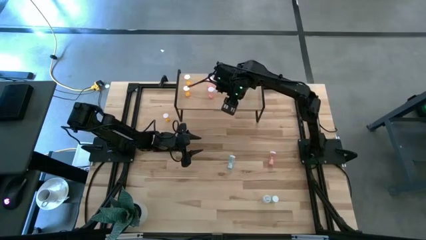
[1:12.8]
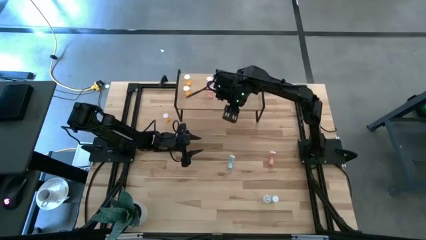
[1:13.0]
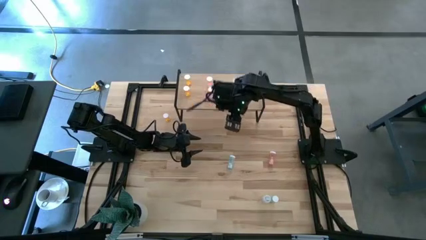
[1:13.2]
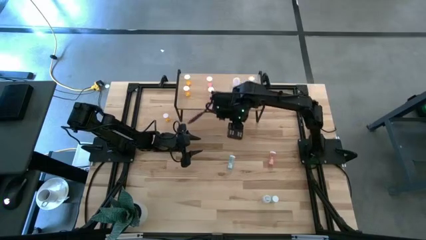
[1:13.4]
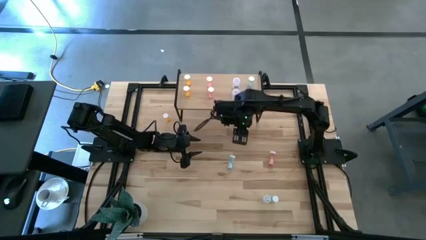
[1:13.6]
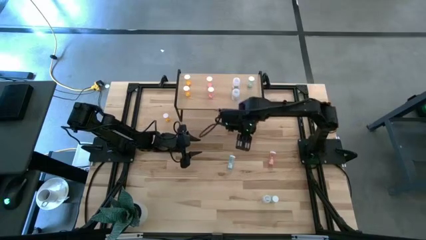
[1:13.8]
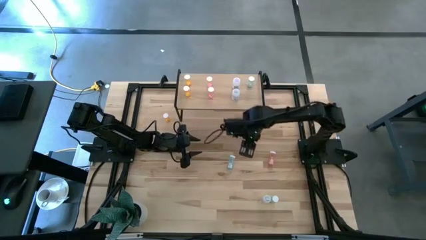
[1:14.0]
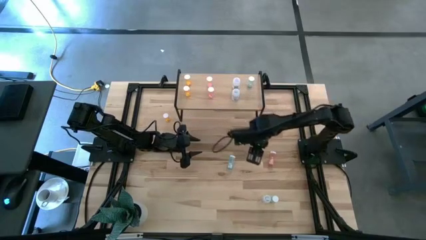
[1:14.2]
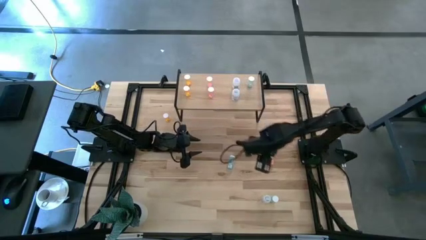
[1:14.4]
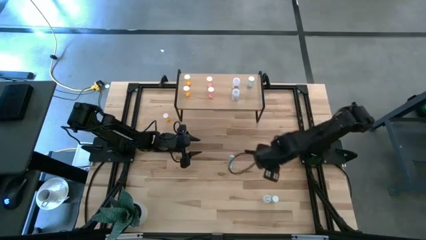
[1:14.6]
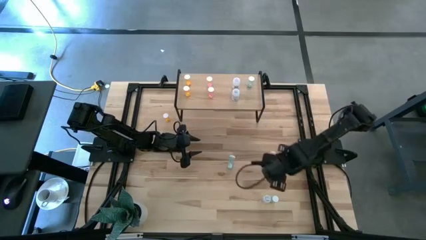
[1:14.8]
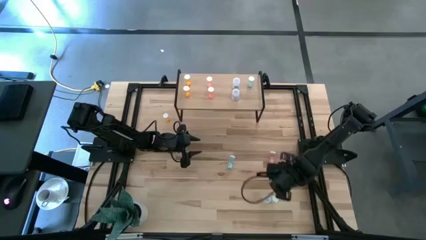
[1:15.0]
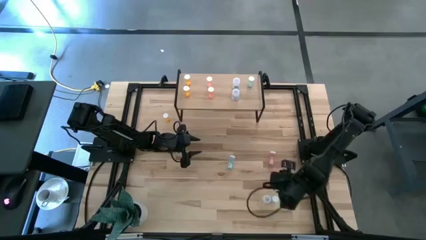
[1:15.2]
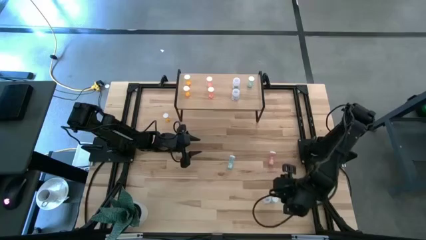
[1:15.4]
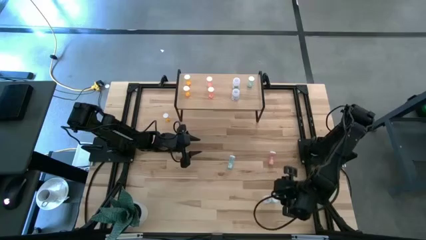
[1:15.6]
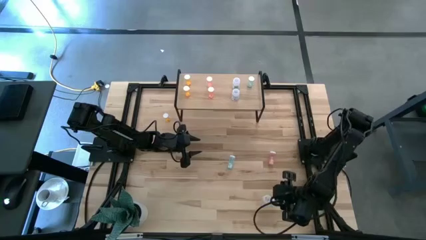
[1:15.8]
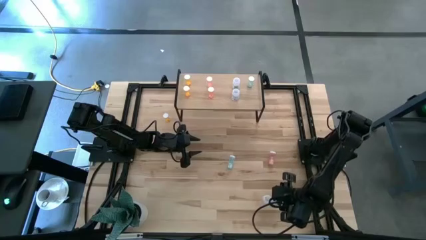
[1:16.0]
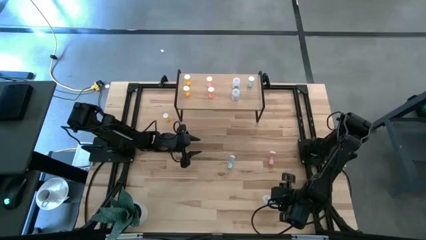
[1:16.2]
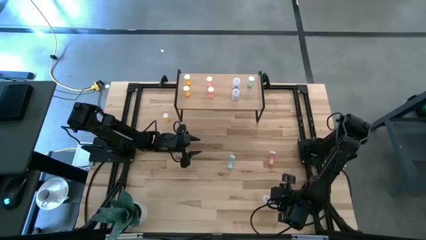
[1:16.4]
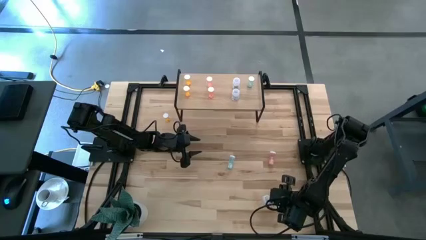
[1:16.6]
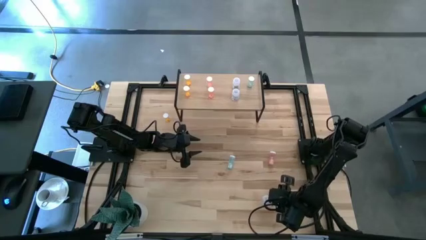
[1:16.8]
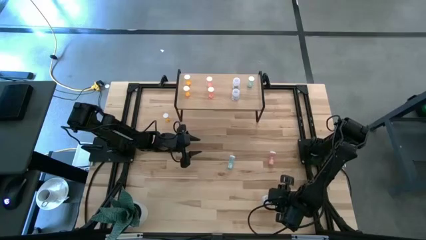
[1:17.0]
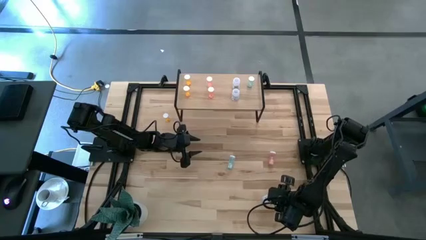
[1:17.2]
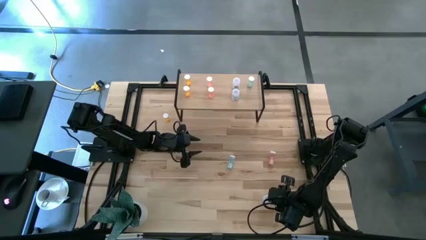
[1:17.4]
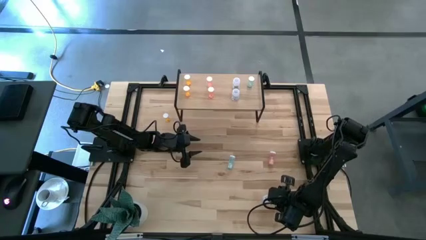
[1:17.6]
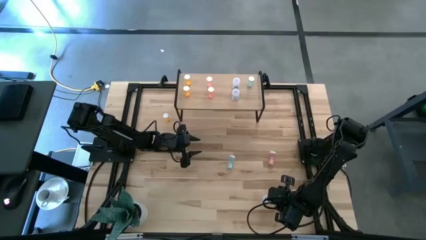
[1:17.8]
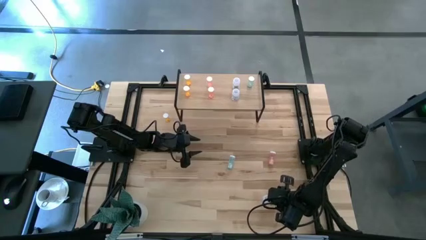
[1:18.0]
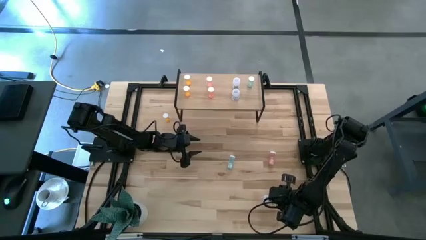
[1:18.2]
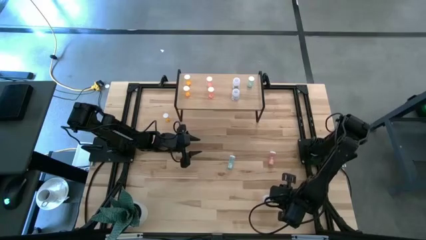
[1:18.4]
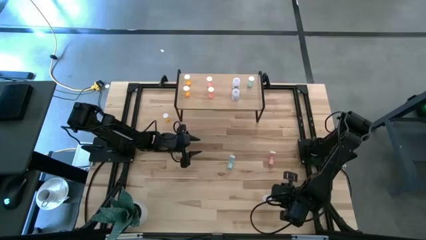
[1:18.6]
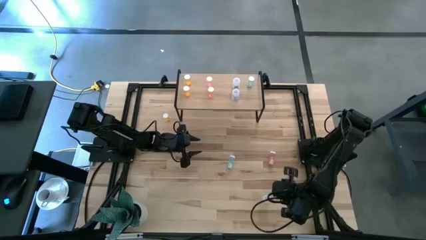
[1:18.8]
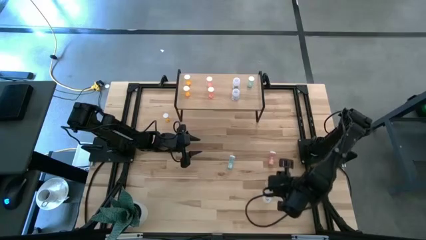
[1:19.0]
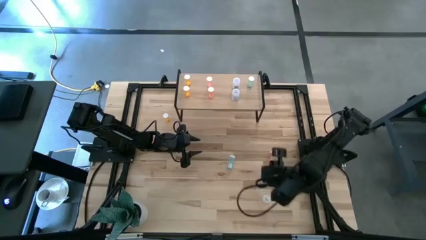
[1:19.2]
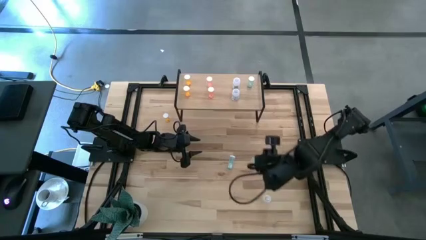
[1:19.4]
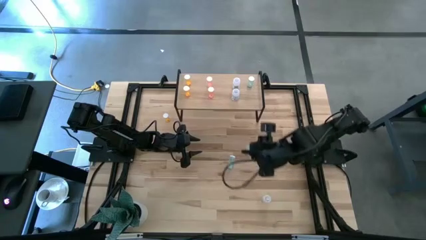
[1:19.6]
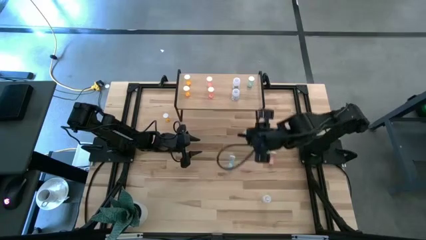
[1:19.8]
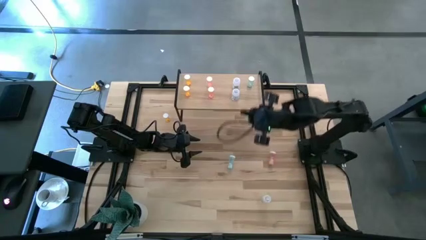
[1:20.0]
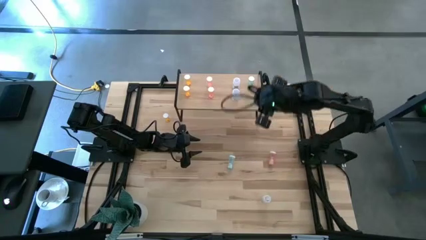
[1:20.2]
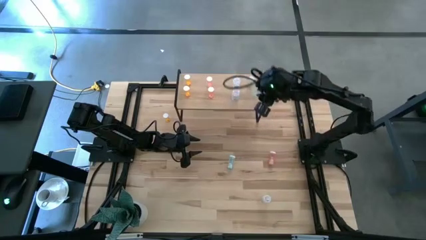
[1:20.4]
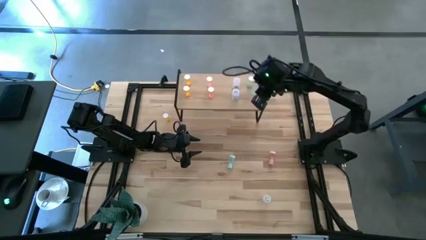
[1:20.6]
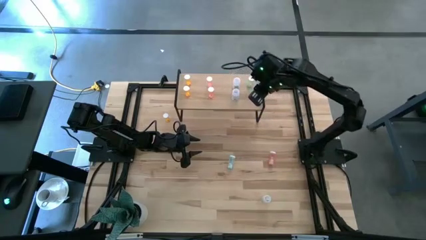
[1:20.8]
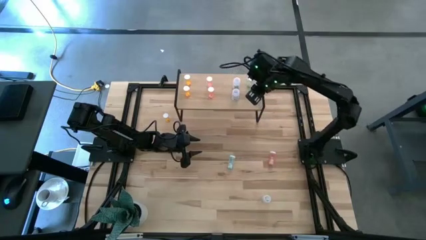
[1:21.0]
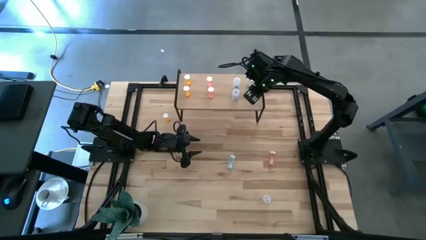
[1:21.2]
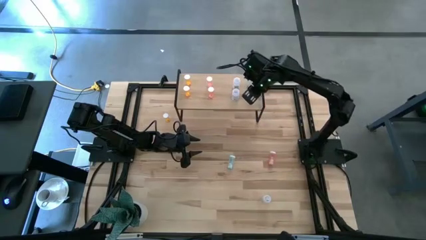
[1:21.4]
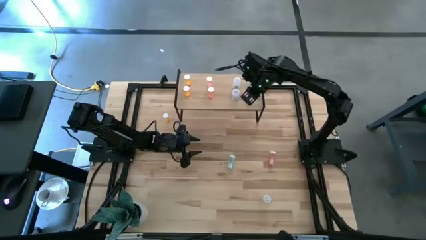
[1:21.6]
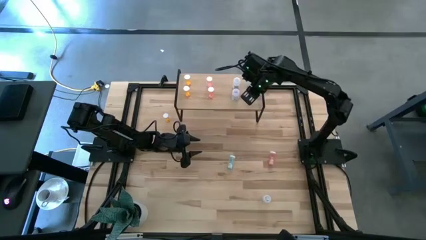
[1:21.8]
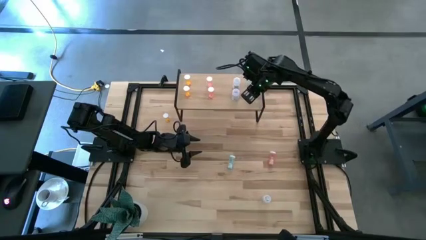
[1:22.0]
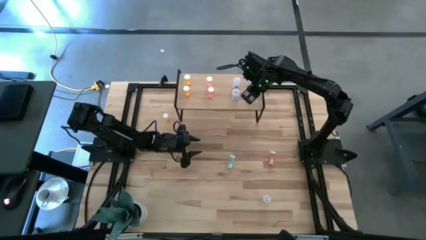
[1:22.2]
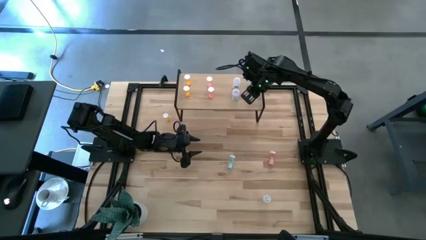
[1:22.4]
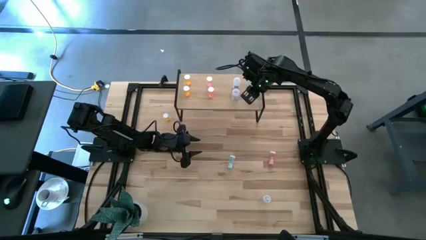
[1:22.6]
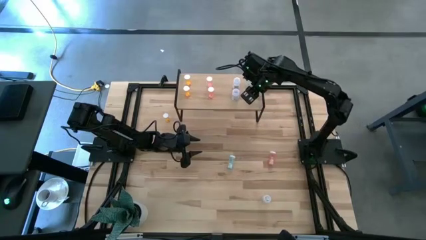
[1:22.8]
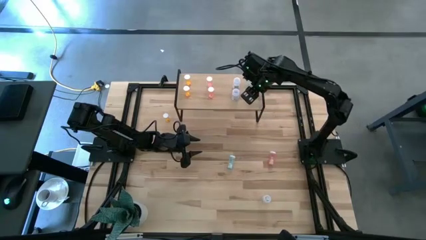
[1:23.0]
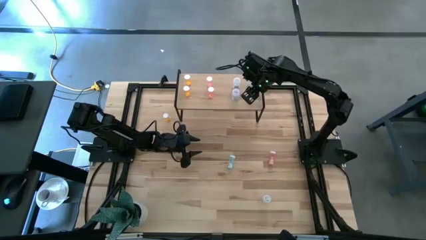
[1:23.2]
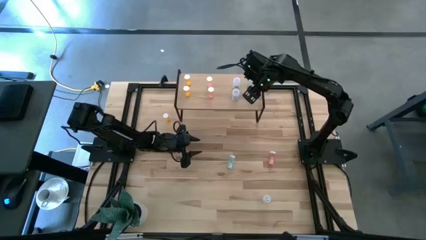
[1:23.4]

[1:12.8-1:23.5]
Task: Pick and place medicine bottles onto shelf by color
Align the right blue pill bottle with the other blue pill bottle on the shelf

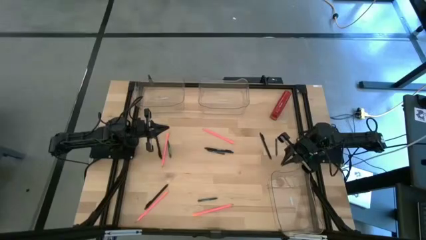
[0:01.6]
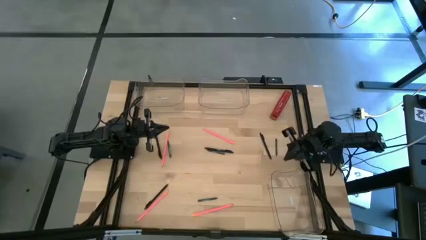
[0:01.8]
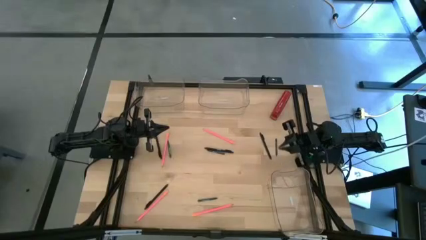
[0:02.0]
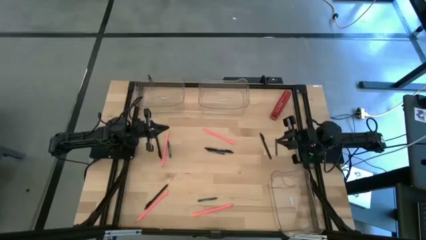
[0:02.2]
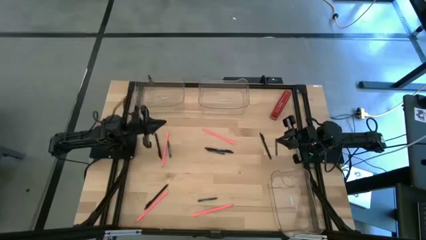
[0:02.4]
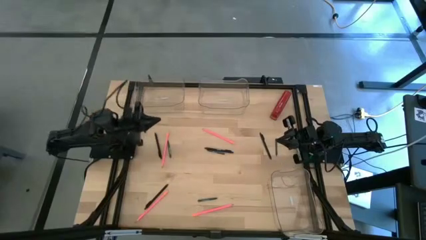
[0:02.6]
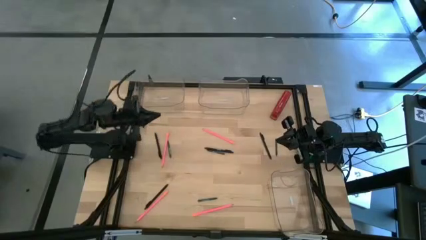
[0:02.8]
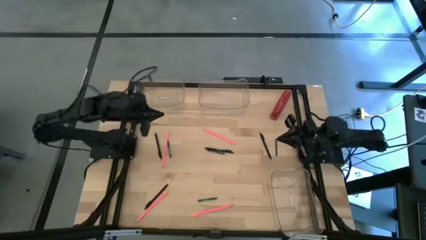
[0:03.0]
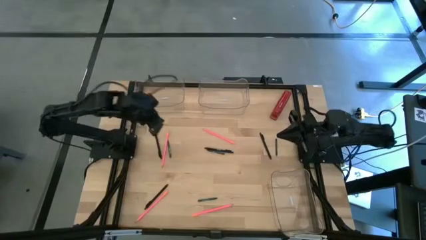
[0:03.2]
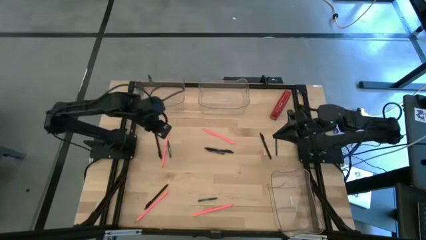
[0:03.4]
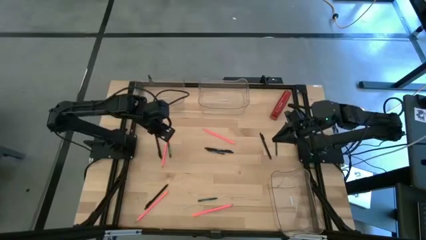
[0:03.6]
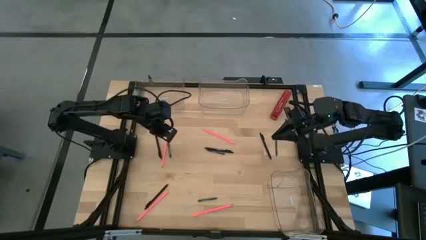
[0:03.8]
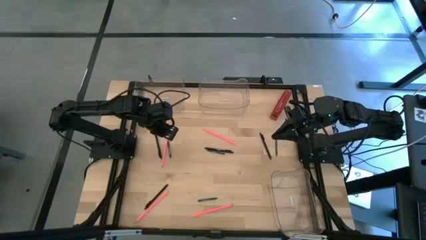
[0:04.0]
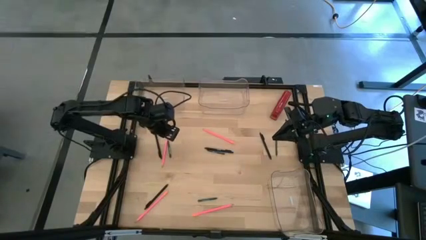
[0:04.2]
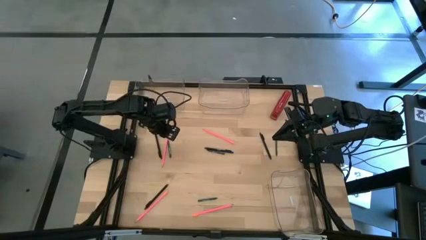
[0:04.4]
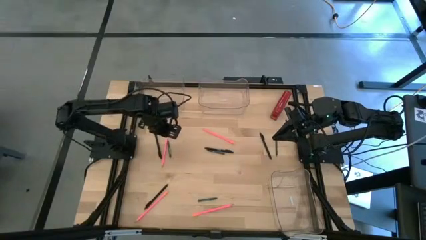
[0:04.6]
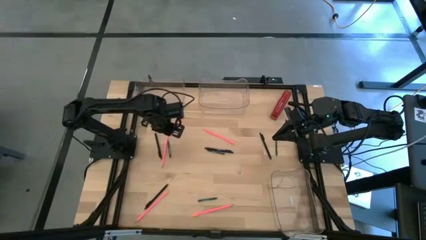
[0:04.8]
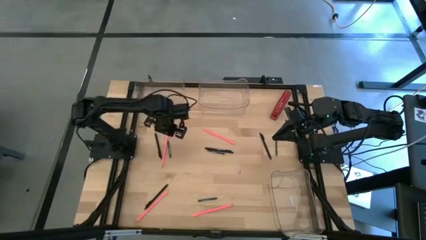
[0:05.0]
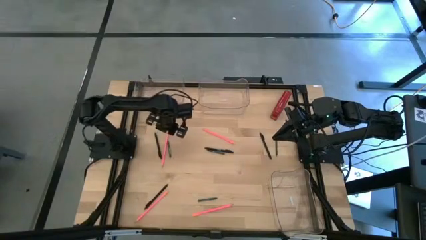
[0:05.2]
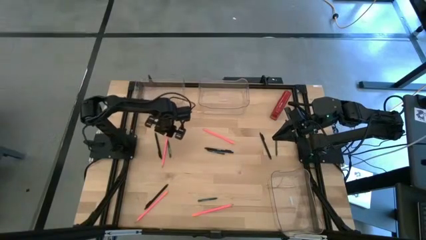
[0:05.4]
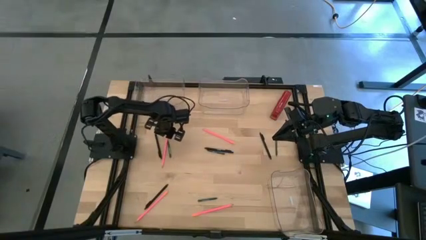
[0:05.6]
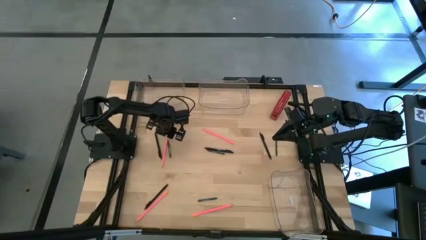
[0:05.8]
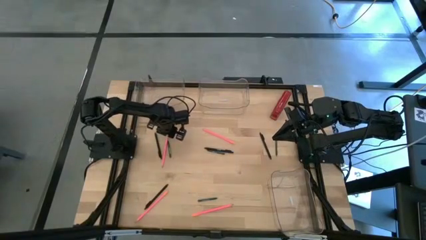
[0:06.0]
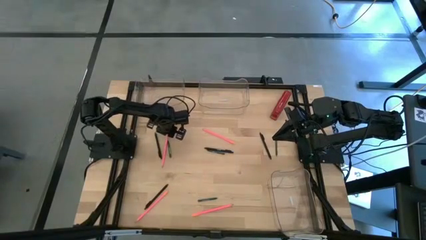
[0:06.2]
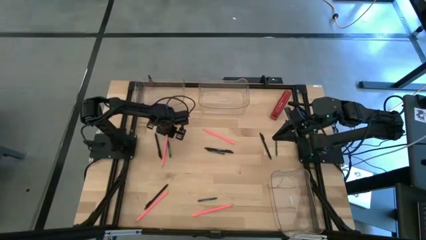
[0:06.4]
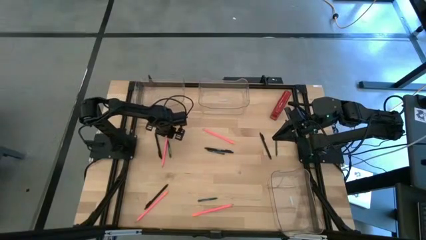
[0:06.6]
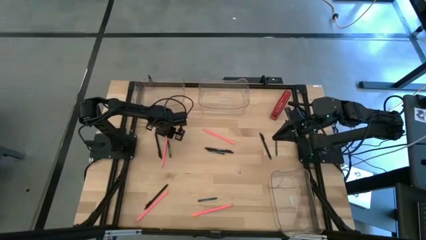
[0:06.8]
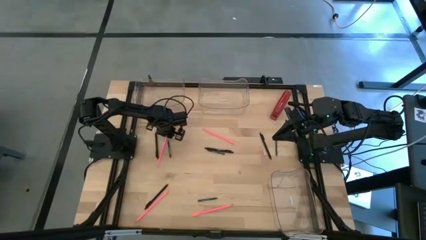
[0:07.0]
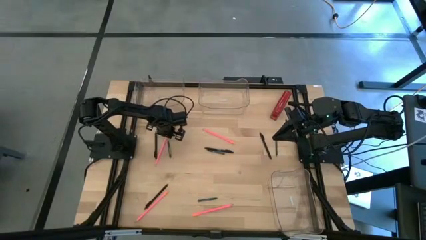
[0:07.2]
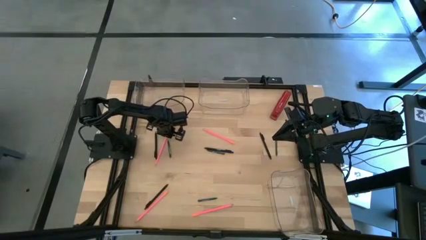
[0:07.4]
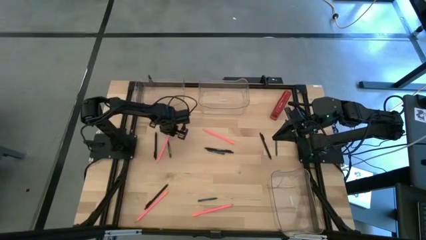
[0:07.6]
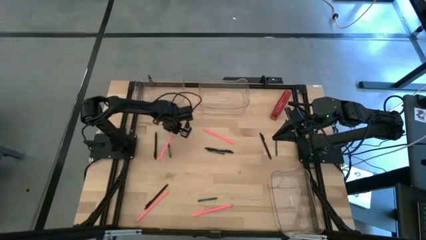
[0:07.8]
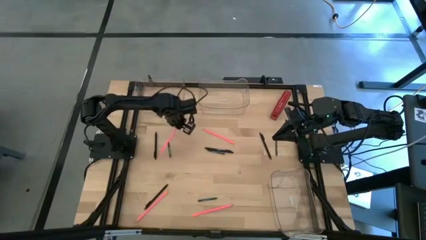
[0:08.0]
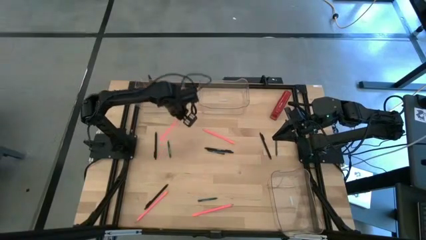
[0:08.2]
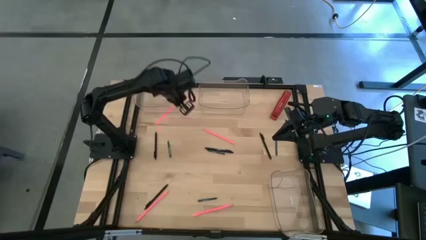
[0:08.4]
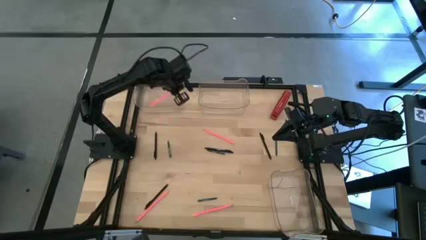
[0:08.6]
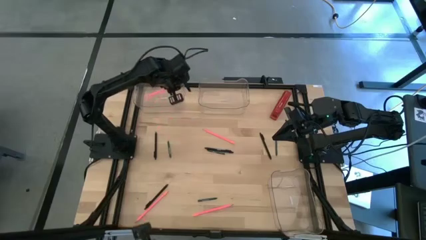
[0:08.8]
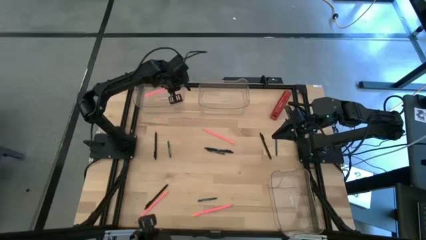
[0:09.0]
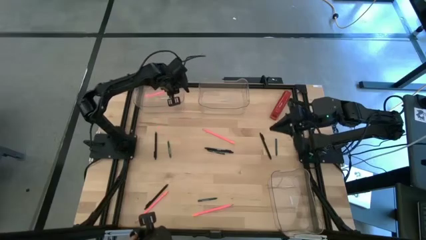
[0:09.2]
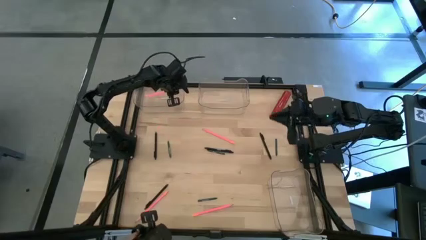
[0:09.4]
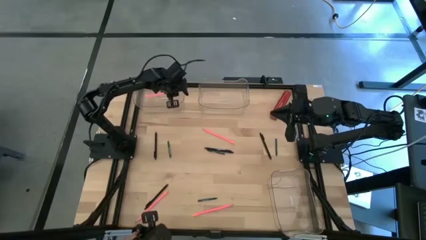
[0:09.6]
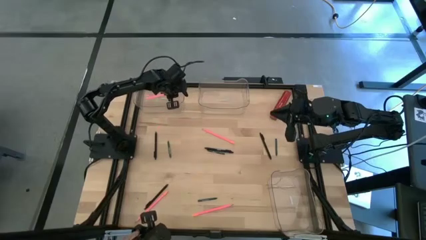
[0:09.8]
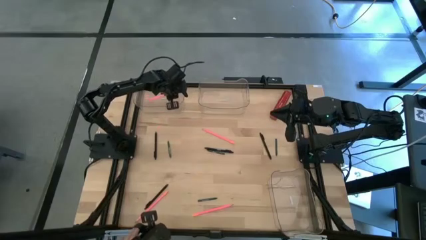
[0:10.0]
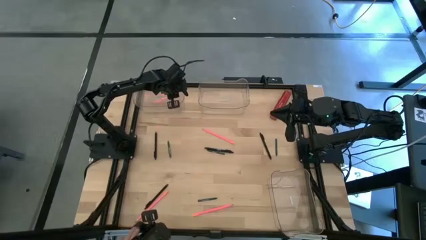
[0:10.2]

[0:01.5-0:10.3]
Task: Sort crayons/erasers/pens/pencils in bins
Put the pink pencil into the top left transparent bin
